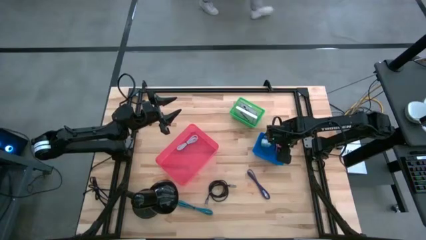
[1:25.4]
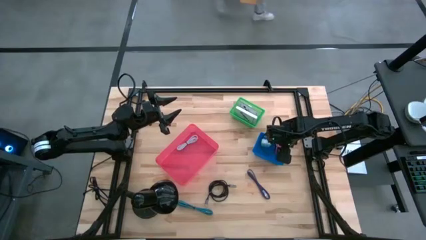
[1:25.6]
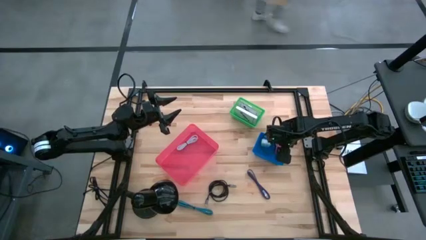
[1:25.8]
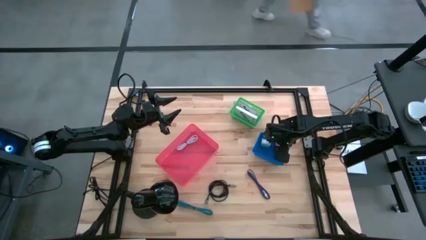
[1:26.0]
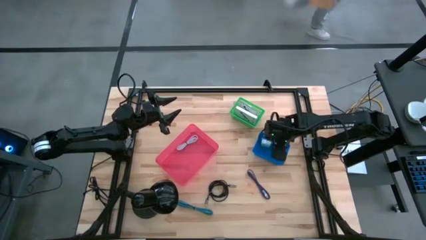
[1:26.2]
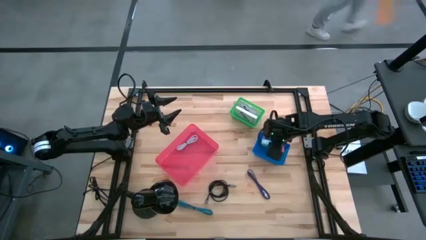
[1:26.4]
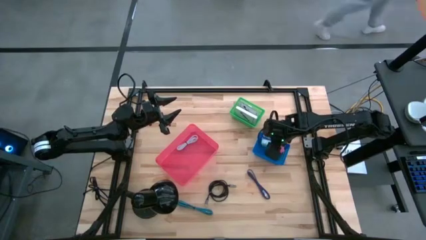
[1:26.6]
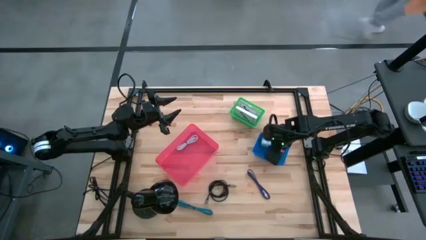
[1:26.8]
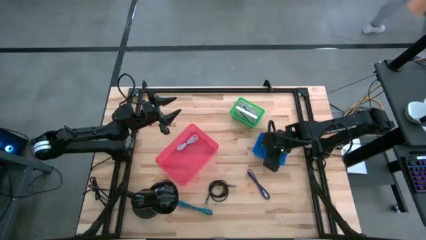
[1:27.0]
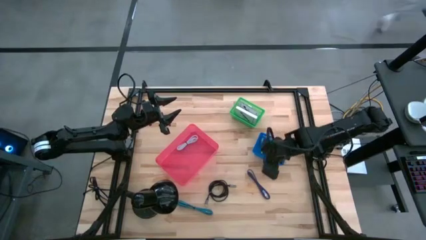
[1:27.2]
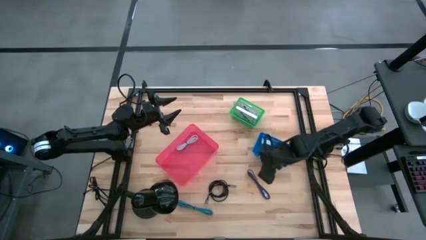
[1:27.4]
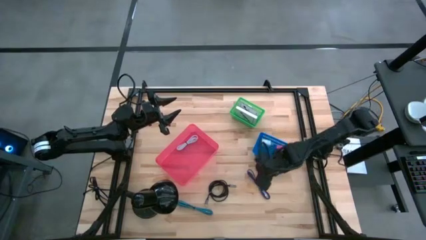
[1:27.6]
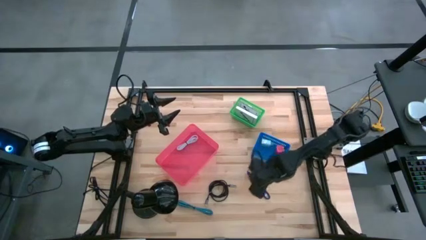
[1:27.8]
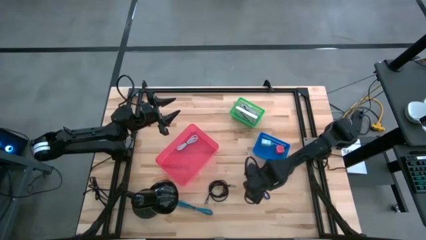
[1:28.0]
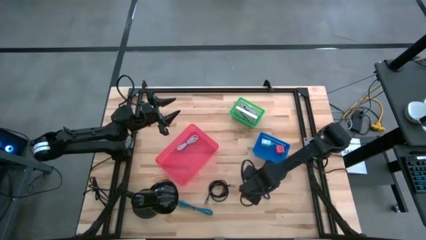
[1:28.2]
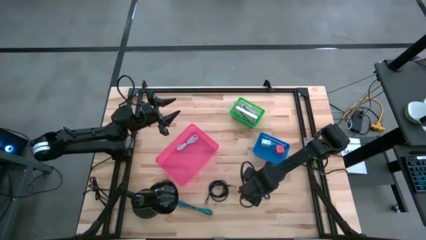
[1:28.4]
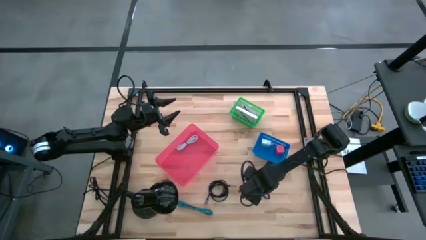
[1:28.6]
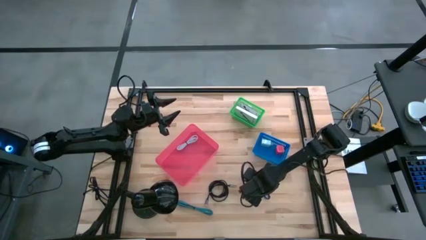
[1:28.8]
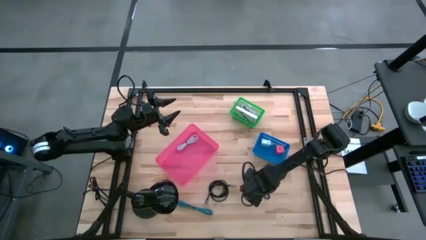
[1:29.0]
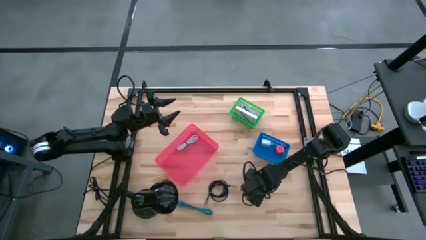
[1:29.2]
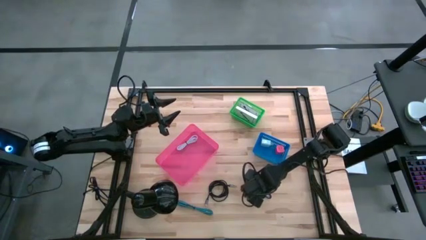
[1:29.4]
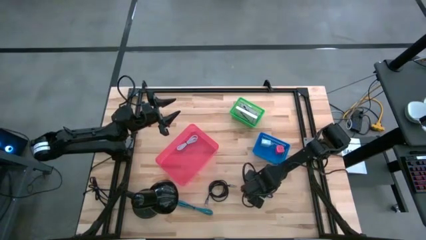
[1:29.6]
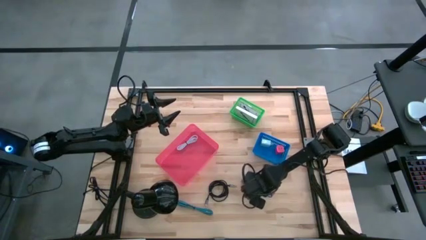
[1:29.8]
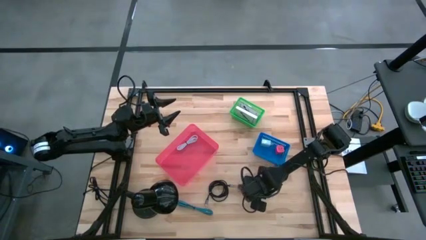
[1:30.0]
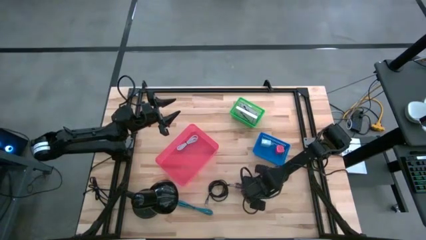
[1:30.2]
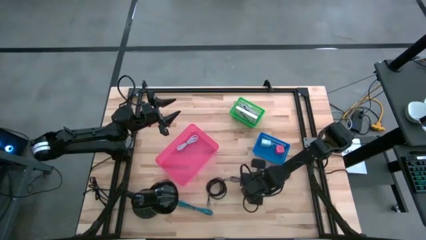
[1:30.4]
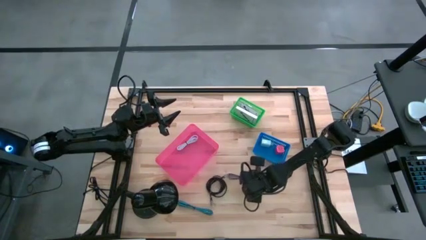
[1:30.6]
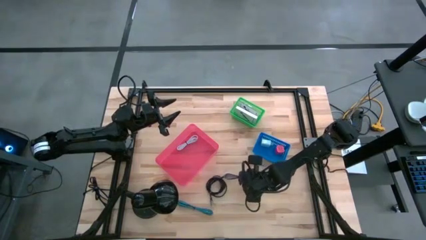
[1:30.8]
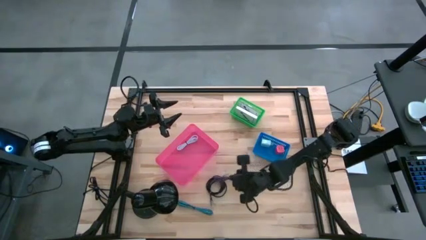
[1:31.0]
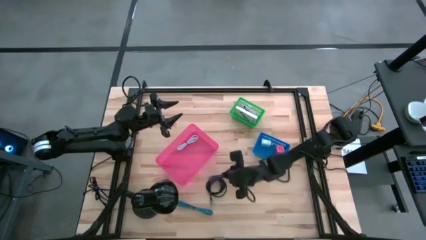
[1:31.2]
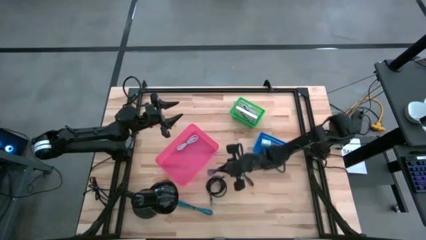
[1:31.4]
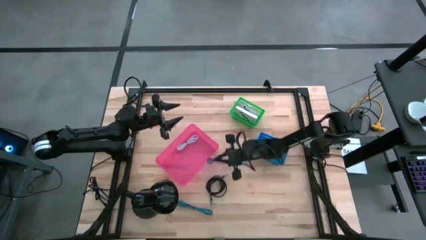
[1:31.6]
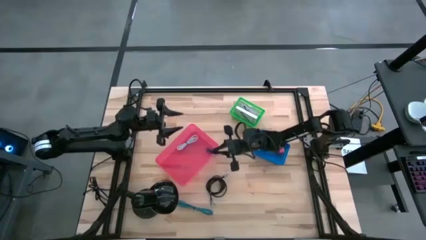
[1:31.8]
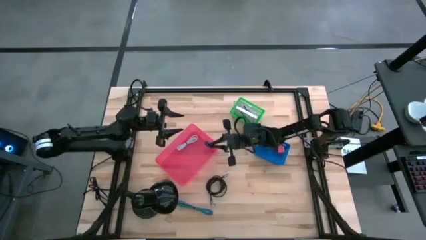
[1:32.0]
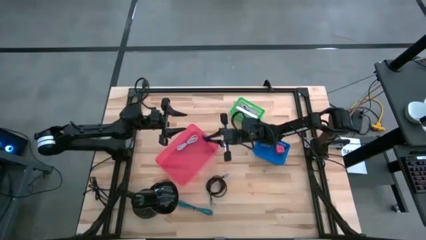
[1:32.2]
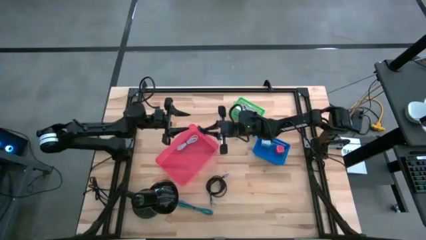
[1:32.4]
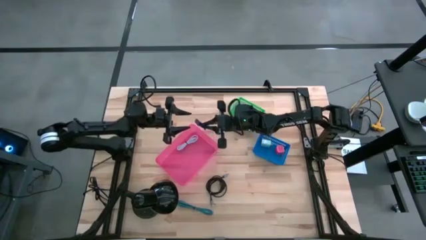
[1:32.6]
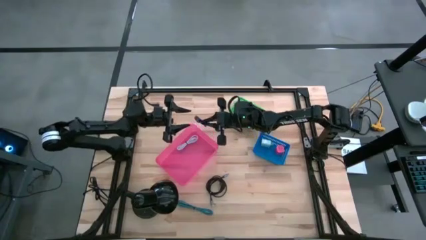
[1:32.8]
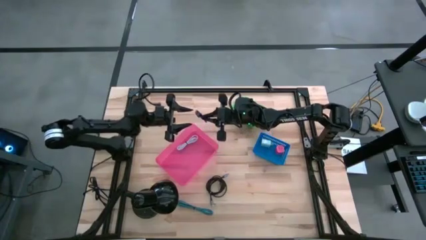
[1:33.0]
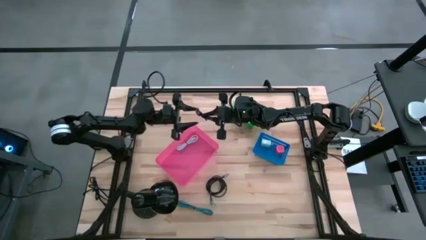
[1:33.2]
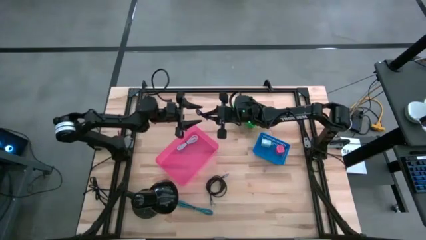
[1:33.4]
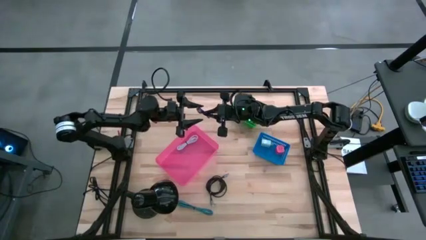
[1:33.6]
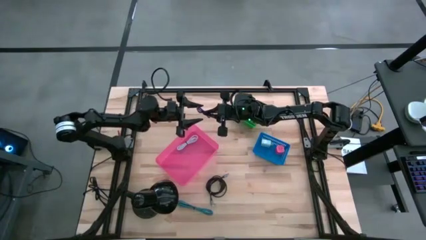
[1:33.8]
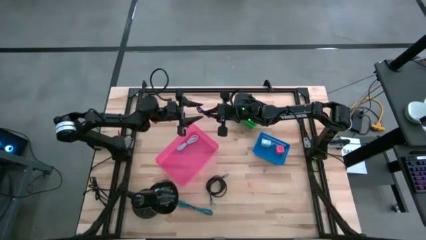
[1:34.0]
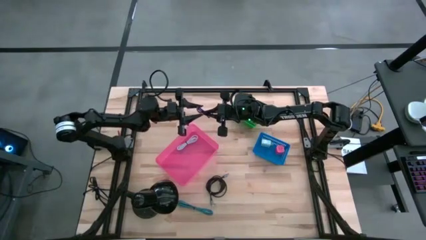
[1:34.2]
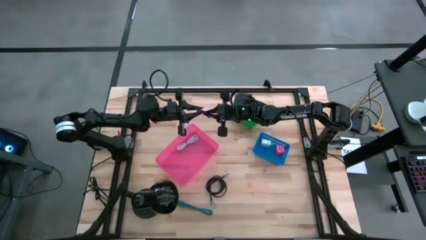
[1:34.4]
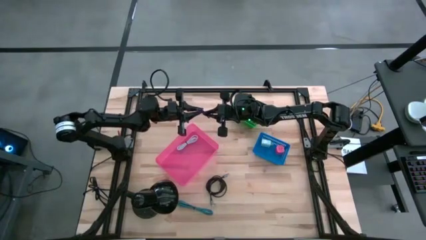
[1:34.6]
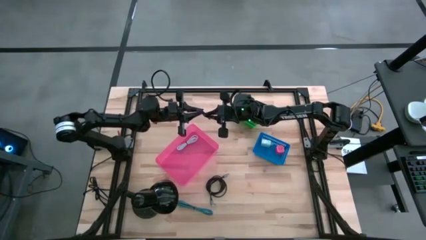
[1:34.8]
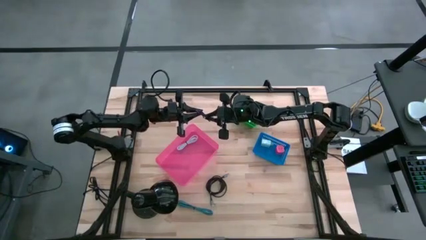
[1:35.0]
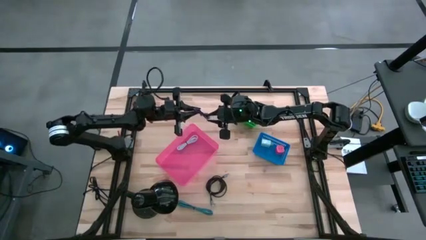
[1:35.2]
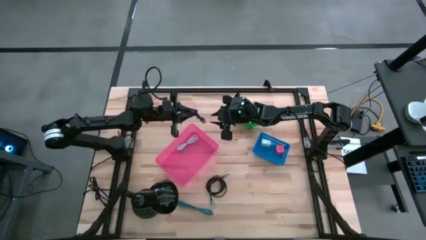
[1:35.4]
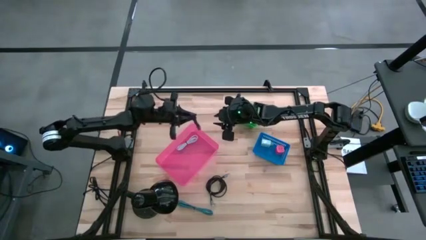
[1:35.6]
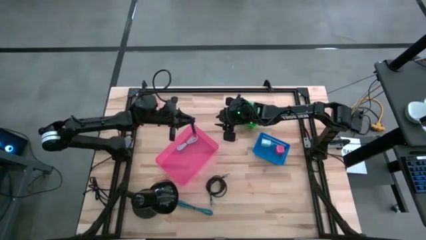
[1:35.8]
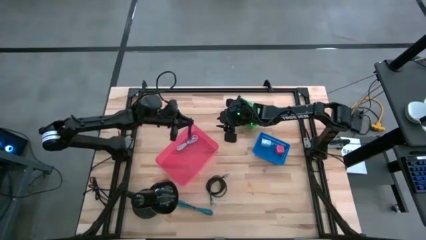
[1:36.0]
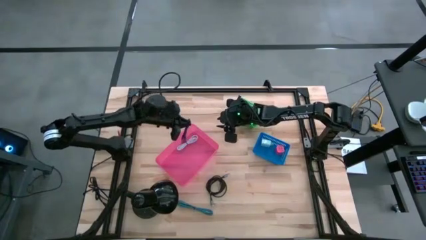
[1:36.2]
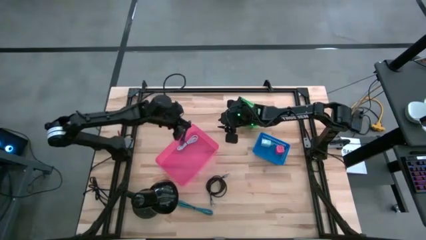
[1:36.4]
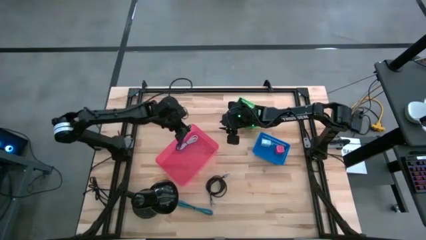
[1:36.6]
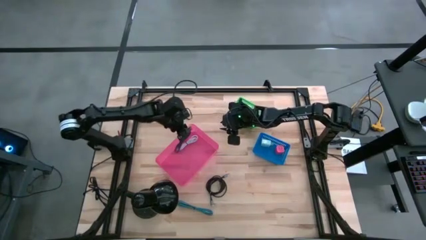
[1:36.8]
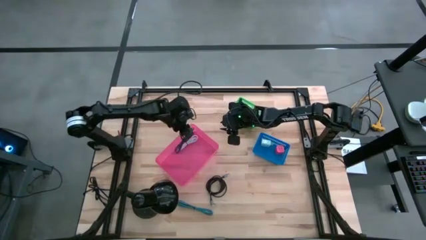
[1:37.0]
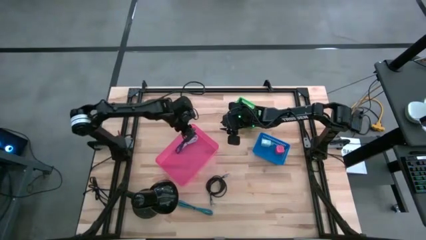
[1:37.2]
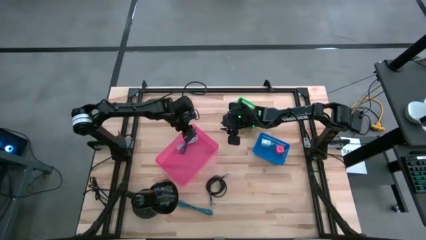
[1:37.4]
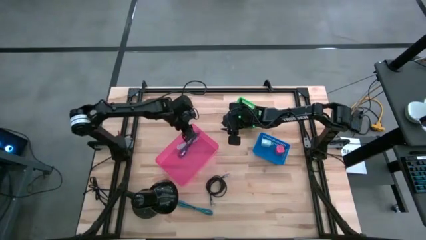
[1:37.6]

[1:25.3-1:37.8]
Task: Pick and place items into bin
Put the blue charger cable into the pink bin

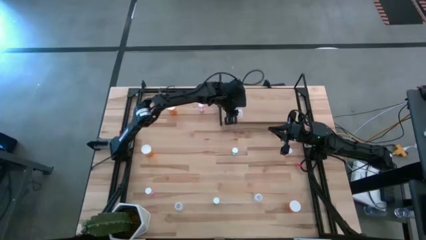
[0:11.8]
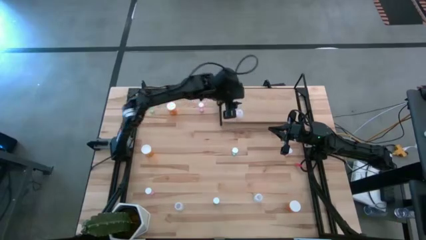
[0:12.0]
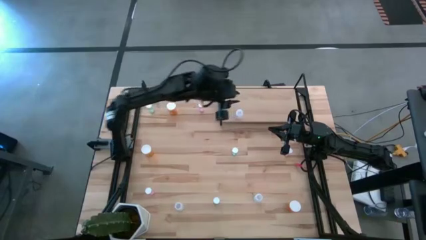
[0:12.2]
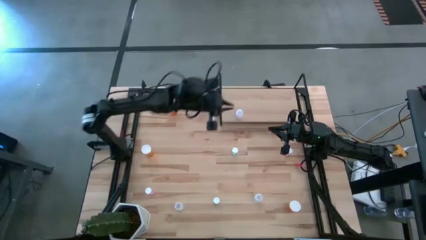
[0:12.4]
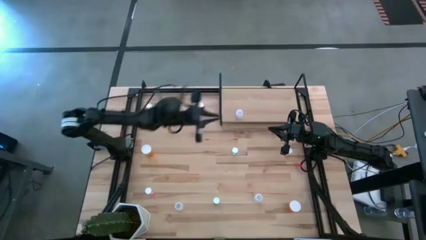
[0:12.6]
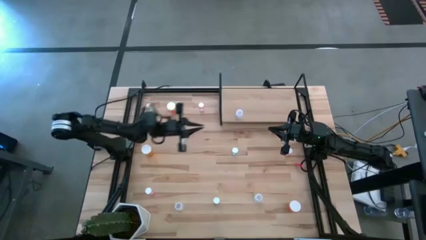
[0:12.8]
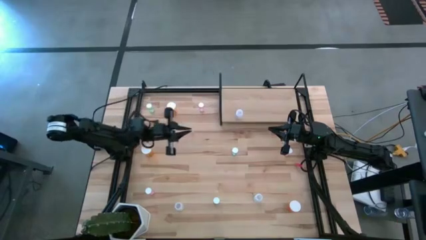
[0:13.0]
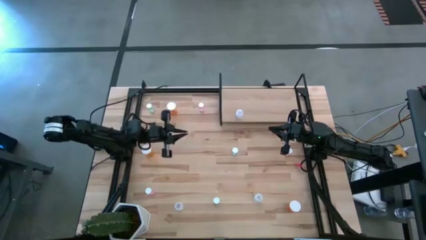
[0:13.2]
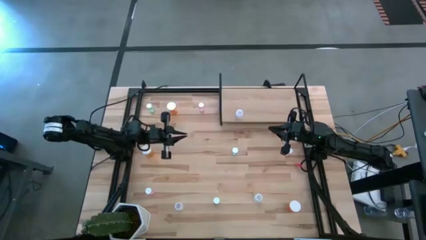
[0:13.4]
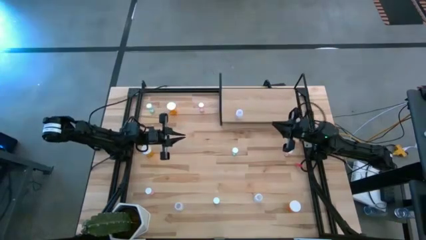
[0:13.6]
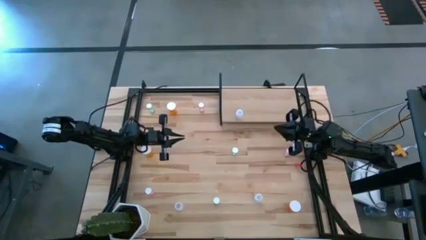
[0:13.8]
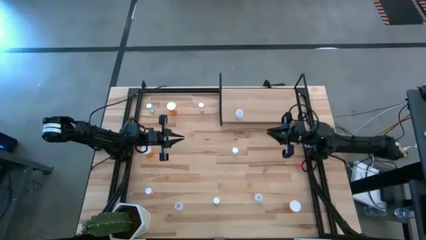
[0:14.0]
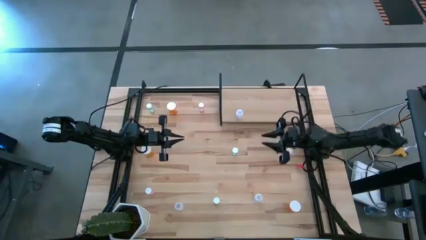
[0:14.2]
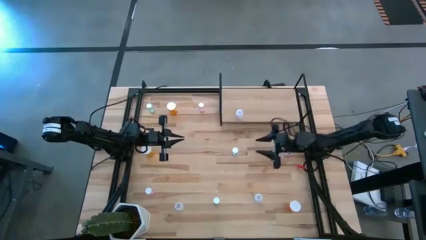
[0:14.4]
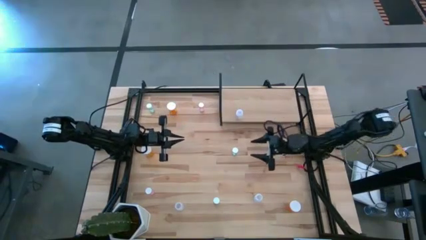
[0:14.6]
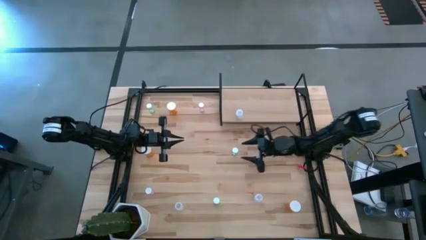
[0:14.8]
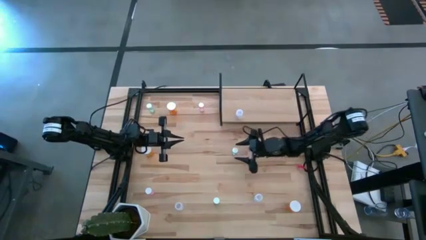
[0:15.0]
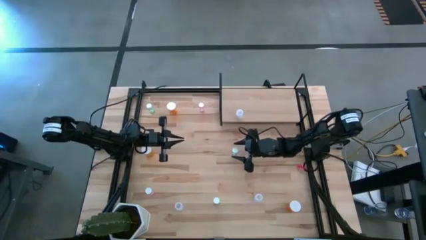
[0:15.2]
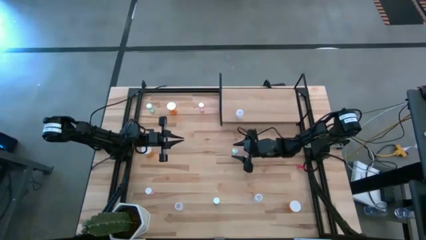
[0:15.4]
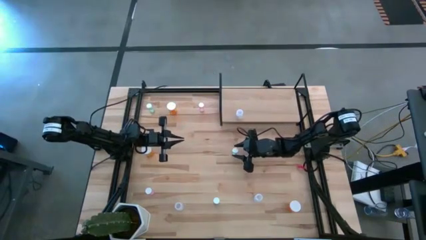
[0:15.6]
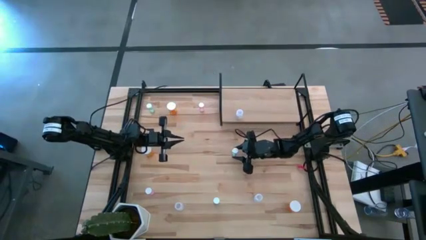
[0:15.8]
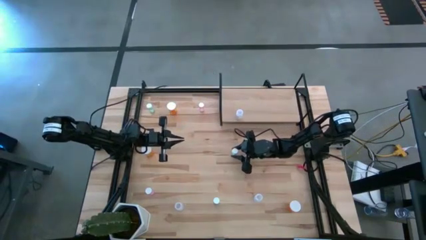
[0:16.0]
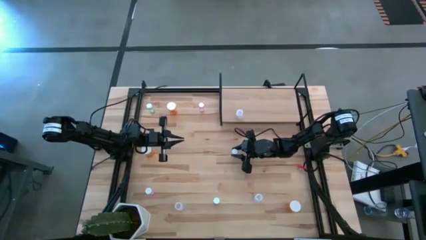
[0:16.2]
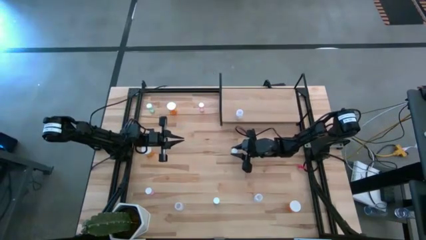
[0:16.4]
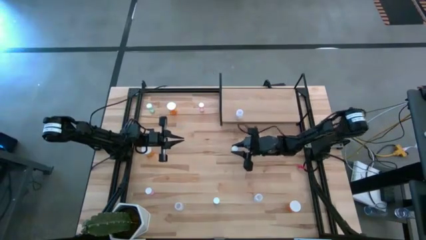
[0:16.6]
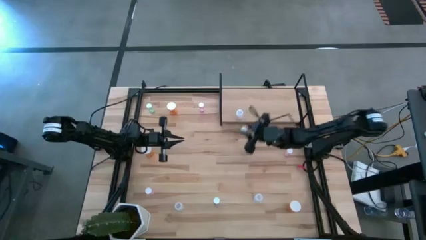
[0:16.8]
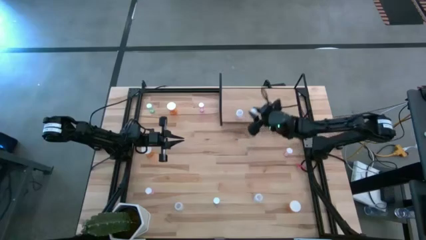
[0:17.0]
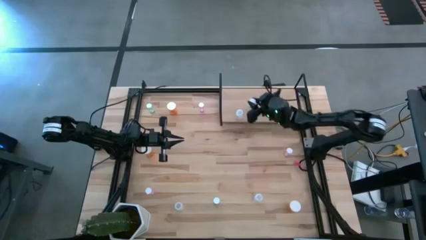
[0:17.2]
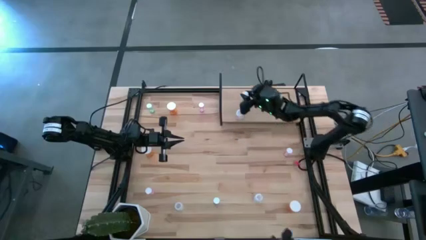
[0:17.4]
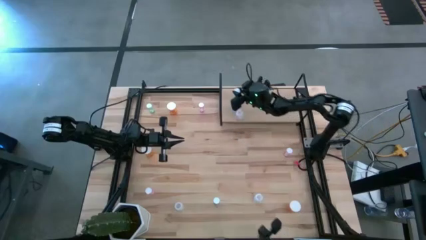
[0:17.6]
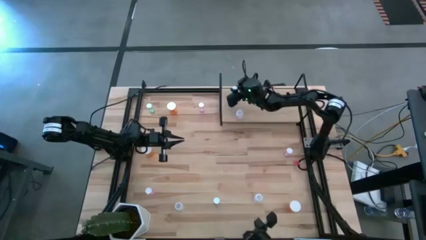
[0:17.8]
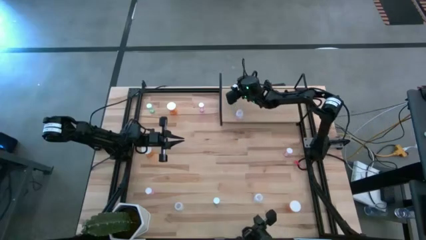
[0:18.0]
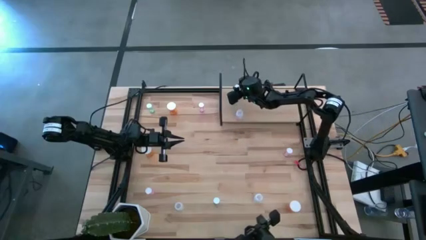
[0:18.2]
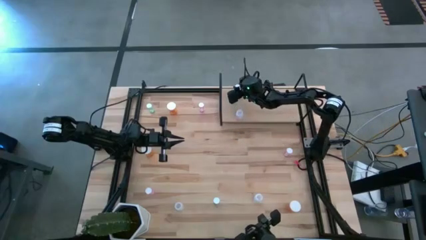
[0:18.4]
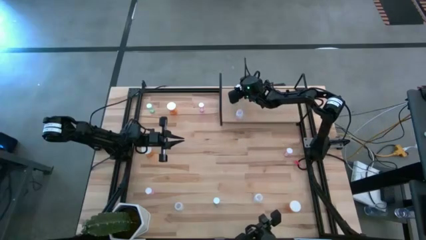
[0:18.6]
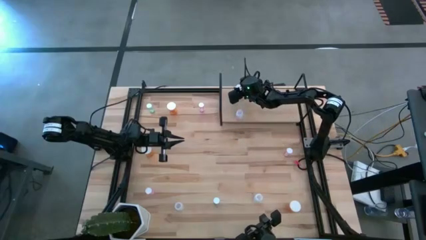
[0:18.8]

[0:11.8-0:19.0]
Task: Pick and place medicine bottles onto shelf by color
Put the middle blue pill bottle on the shelf
